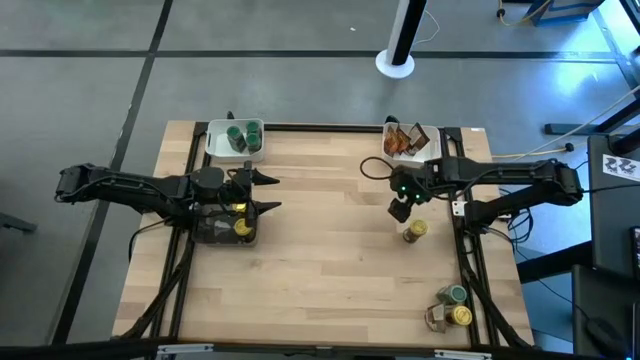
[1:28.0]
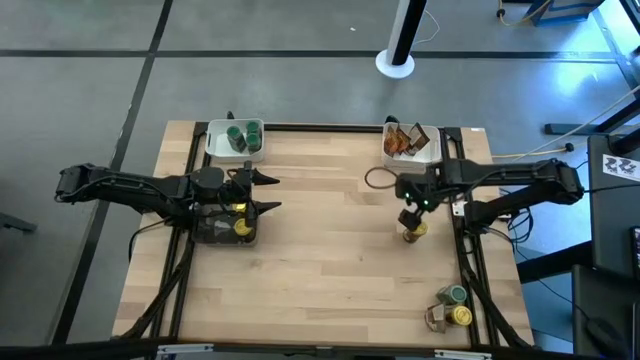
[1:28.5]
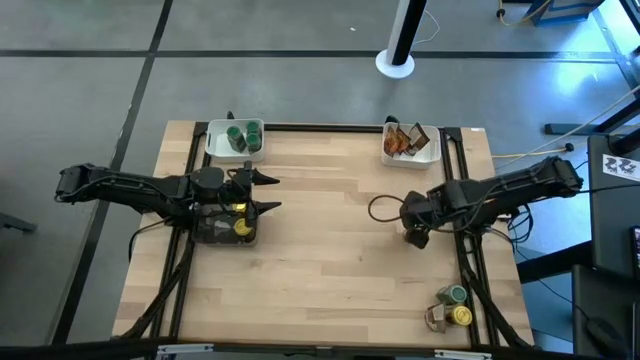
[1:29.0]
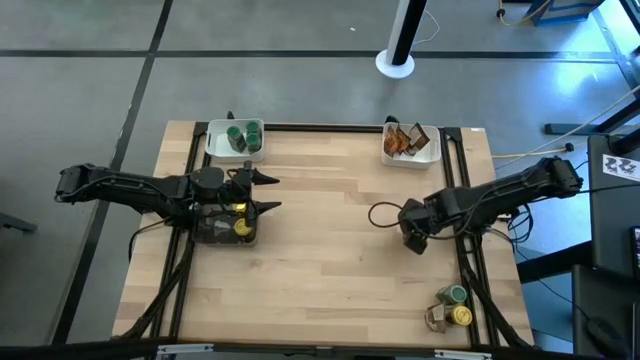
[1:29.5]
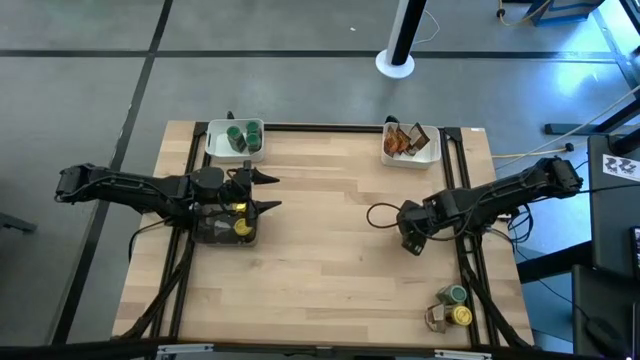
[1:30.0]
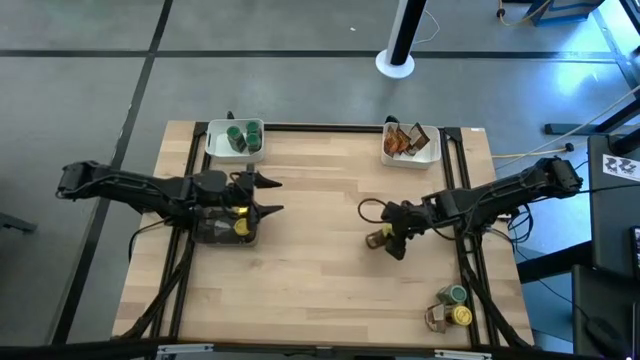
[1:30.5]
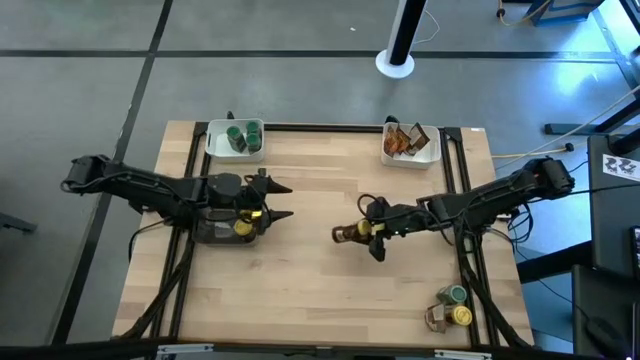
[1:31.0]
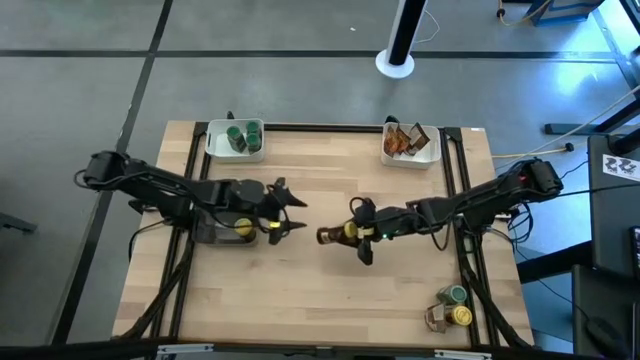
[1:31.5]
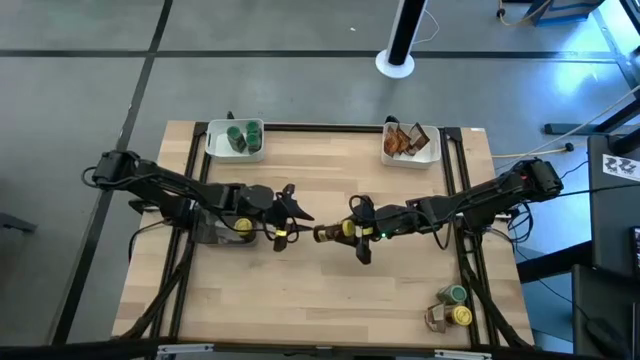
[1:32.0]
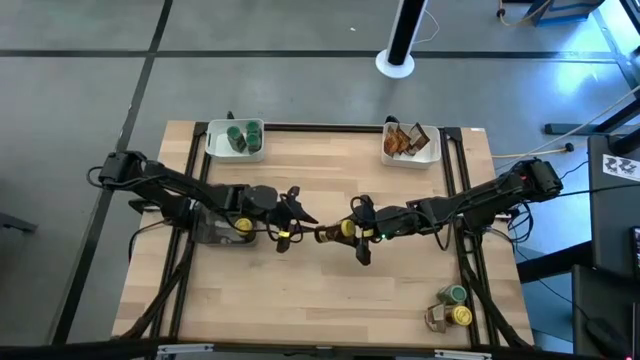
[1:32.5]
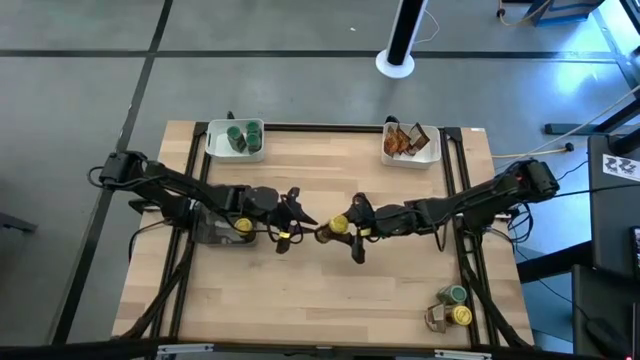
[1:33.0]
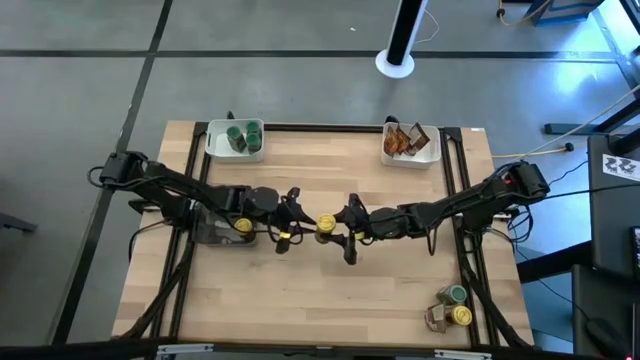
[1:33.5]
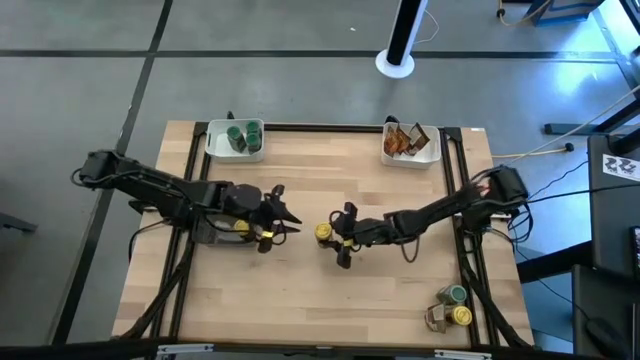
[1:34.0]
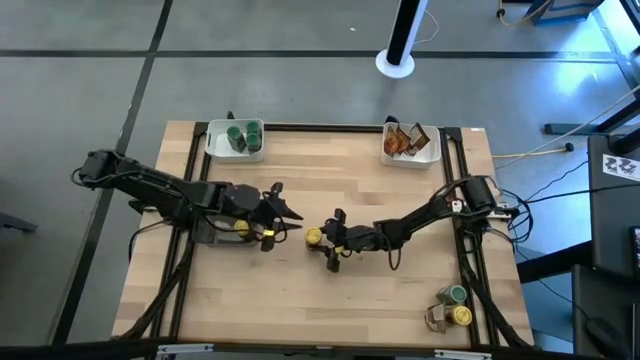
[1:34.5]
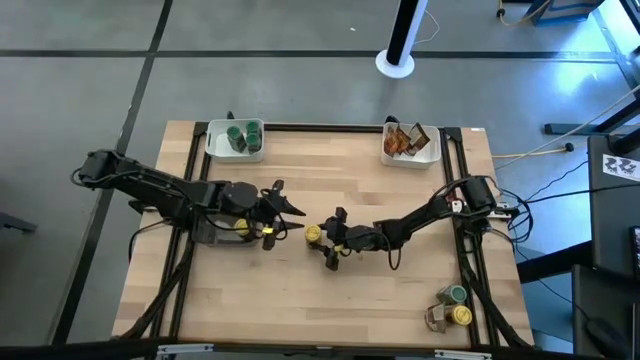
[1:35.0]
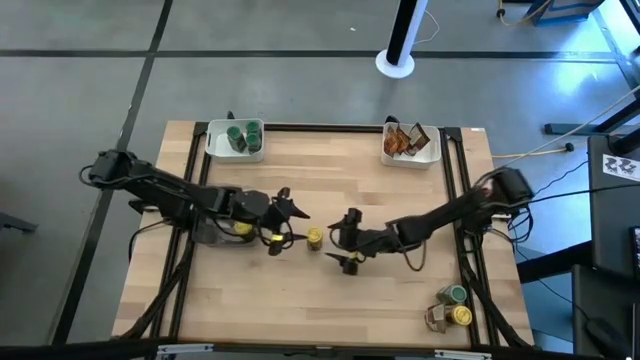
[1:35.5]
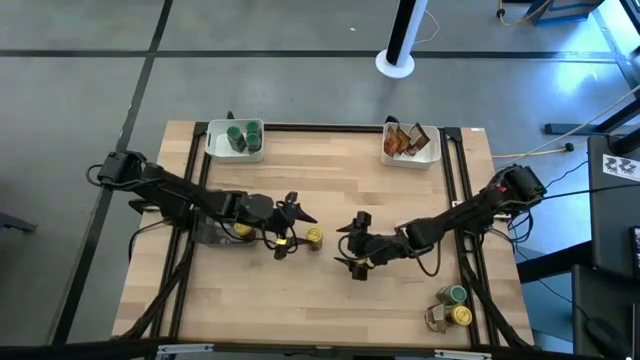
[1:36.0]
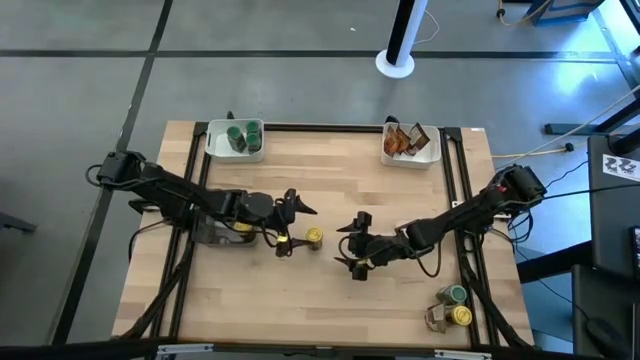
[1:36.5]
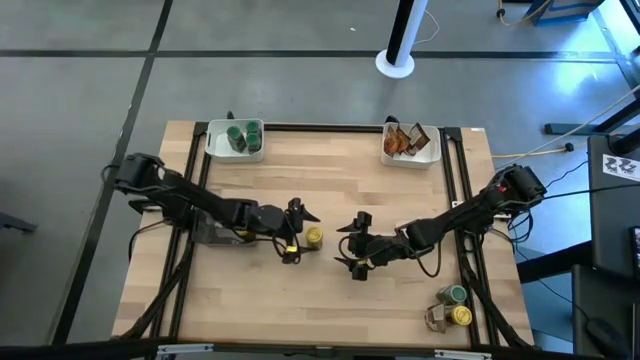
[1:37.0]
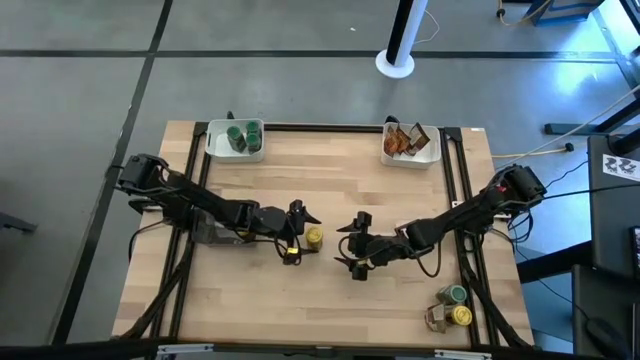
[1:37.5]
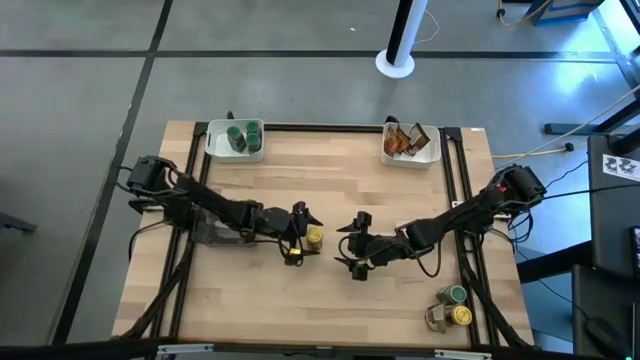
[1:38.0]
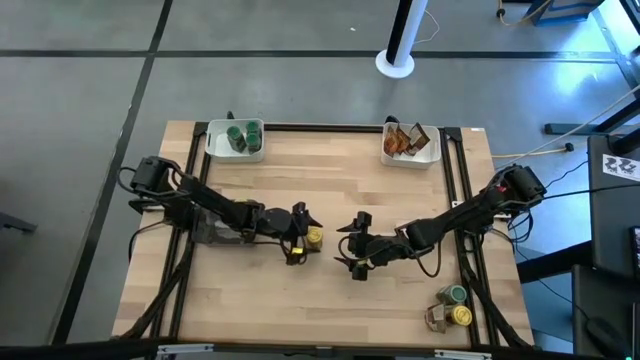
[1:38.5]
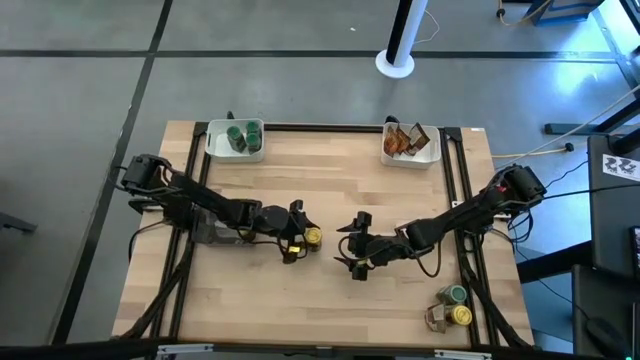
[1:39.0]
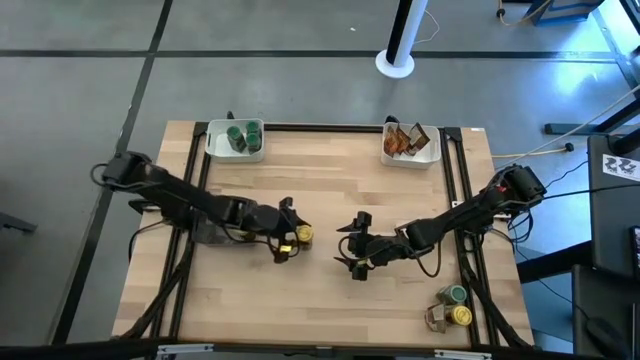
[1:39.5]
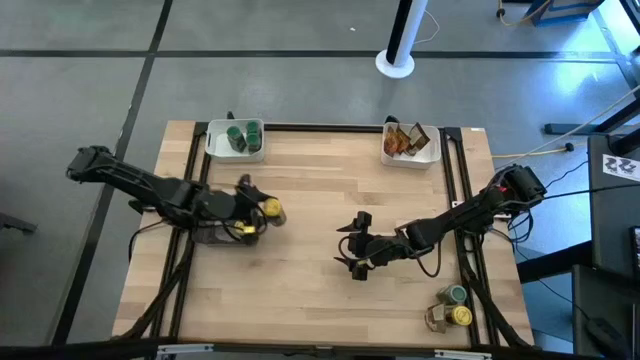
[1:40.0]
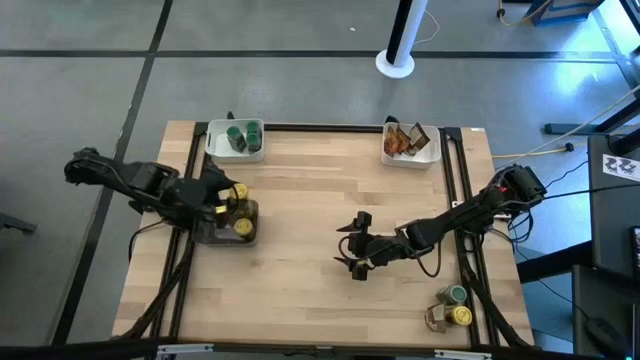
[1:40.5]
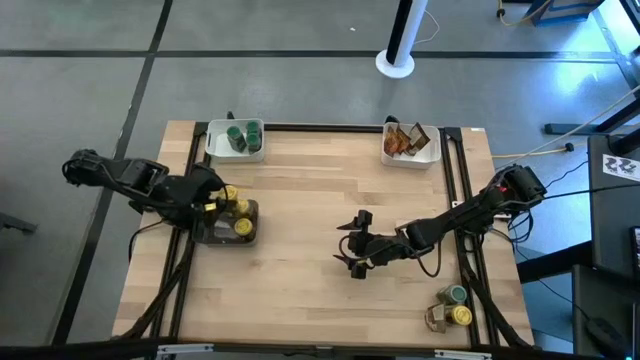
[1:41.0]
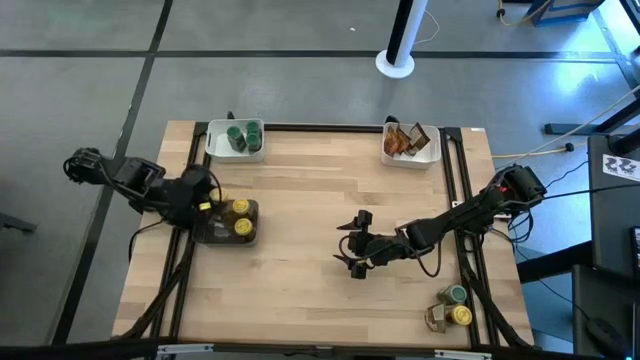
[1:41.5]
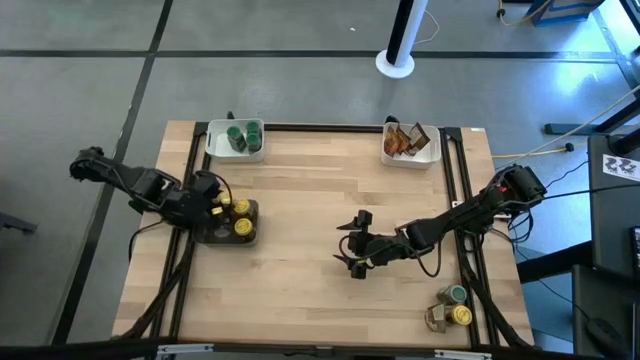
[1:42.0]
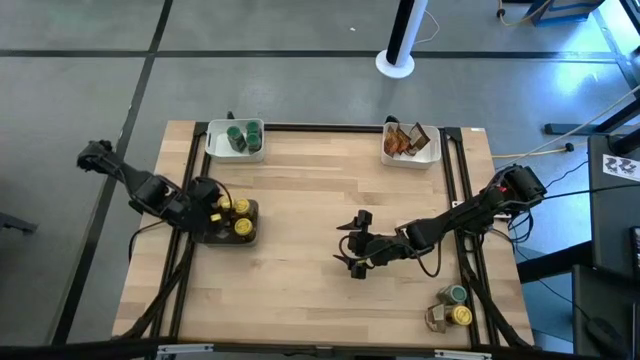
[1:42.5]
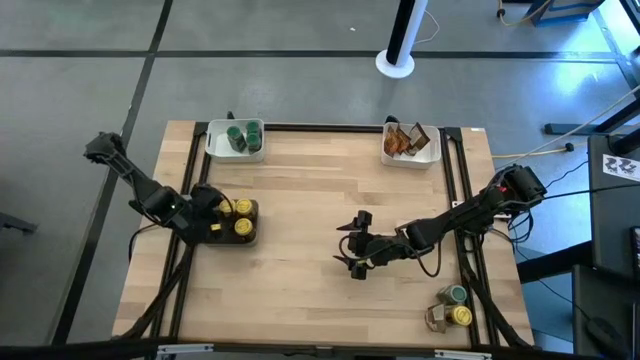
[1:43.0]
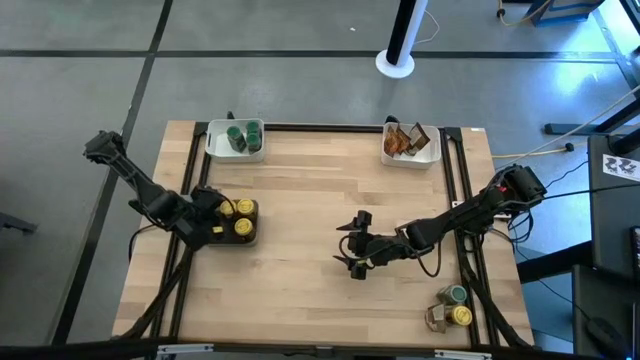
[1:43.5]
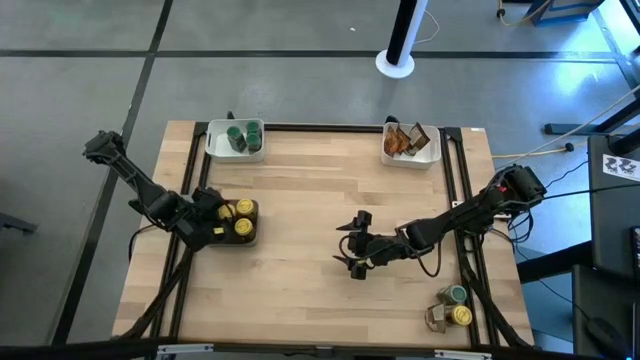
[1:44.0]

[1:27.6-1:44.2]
Task: Sort spices by type
Put the yellow seasoning bottle into the black bin

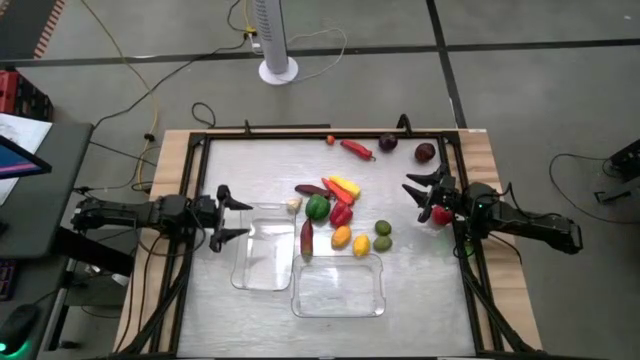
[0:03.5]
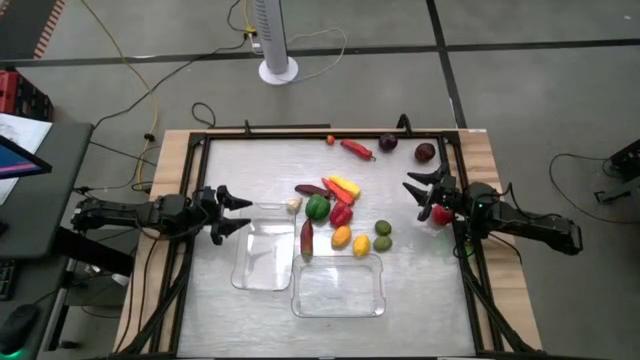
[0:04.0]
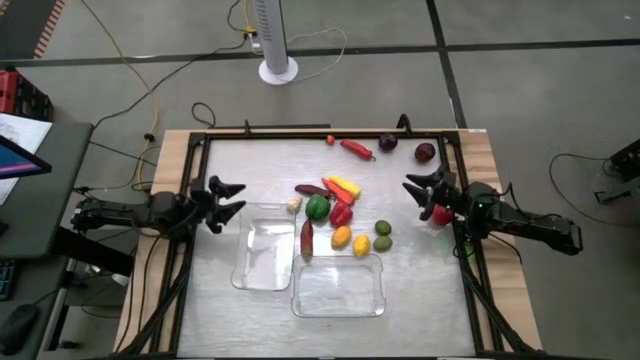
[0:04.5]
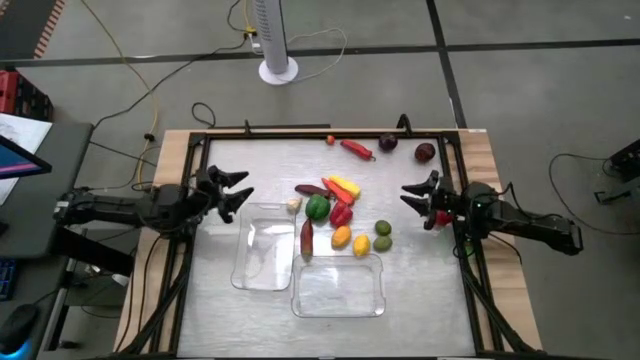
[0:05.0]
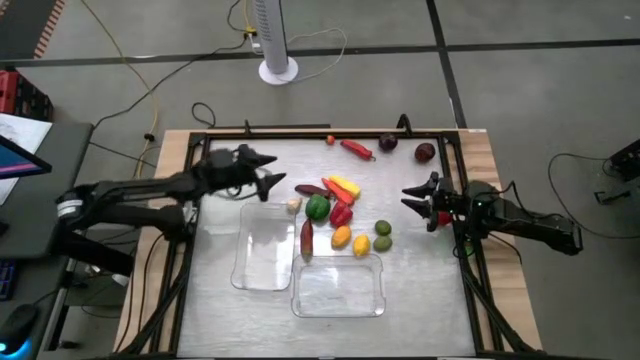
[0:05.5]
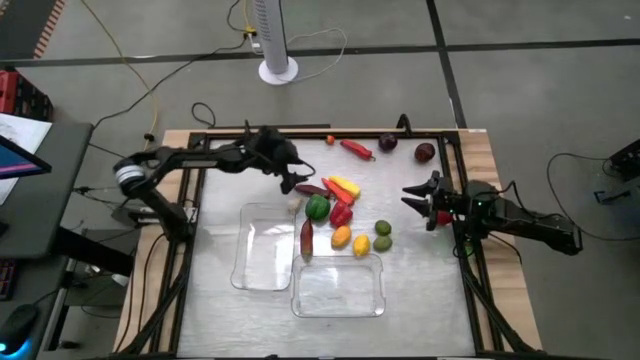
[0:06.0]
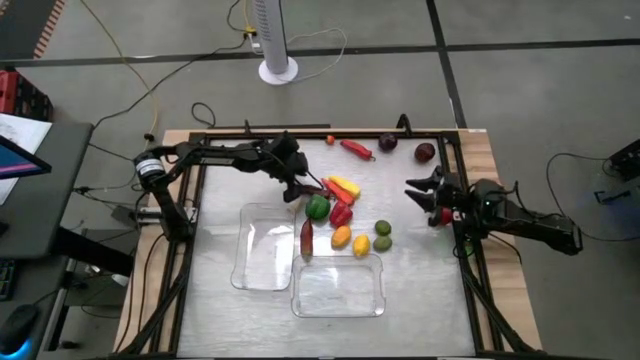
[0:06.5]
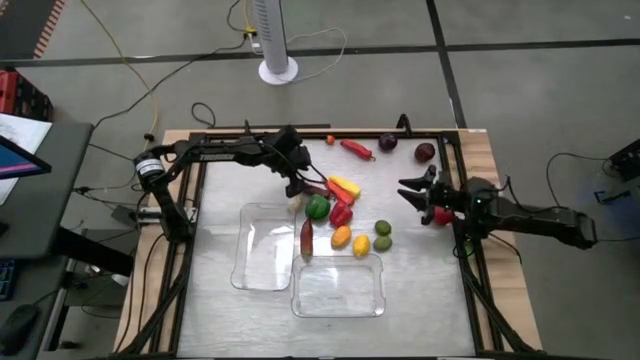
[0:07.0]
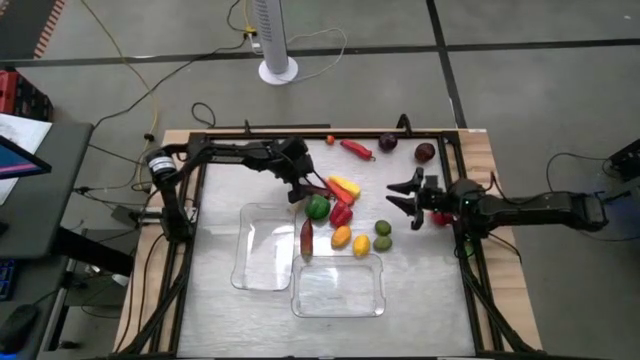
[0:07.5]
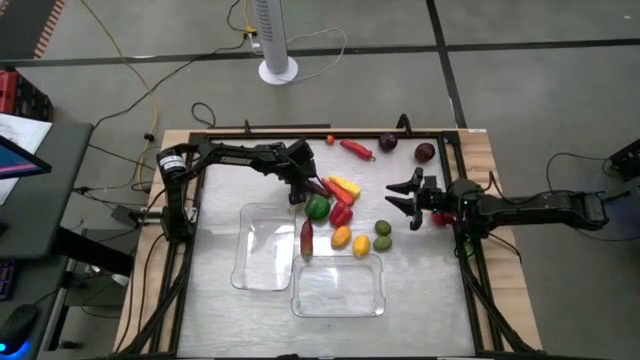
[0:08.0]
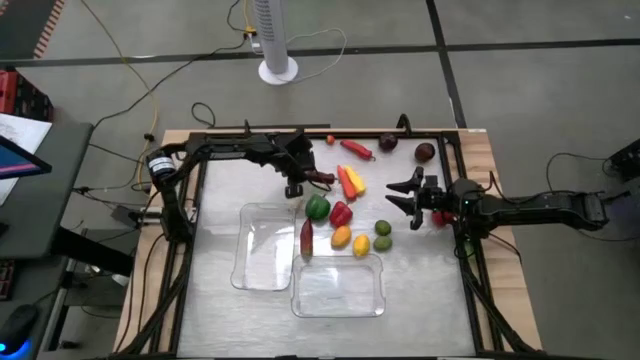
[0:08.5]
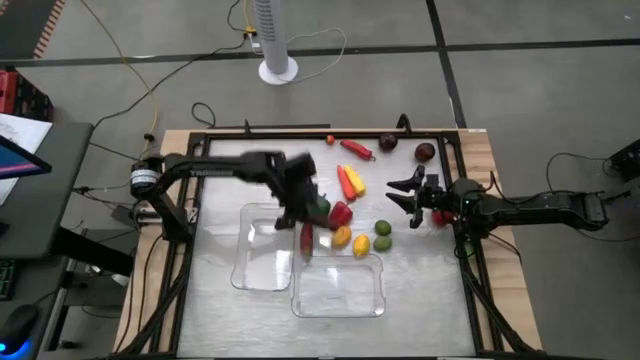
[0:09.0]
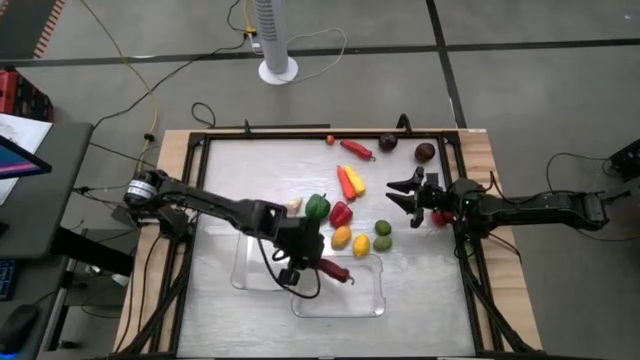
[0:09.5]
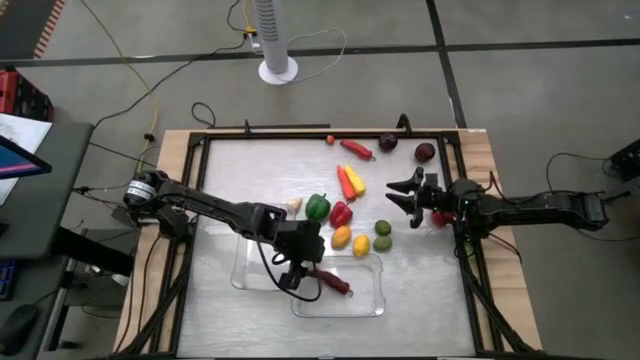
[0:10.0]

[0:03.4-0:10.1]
Task: Sort produce into baskets
Put the top dark red bell pepper into the right transparent bin
